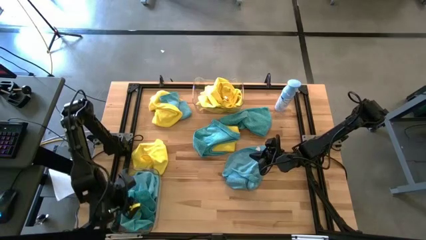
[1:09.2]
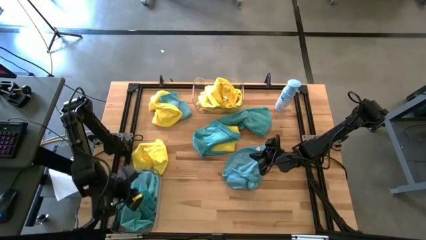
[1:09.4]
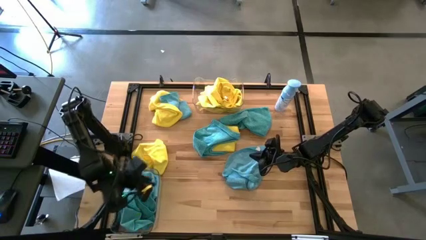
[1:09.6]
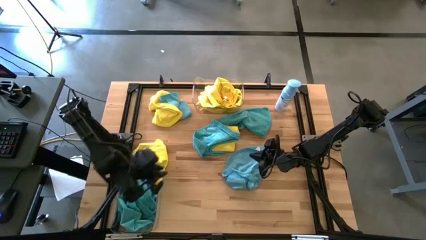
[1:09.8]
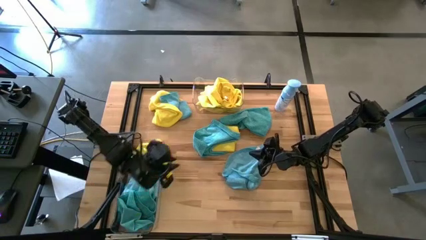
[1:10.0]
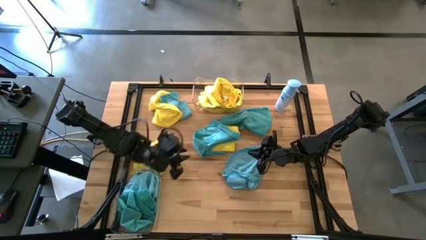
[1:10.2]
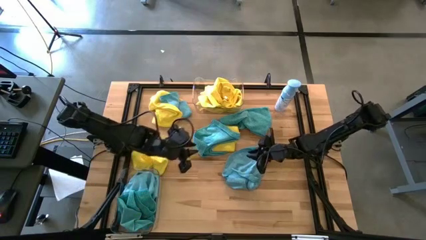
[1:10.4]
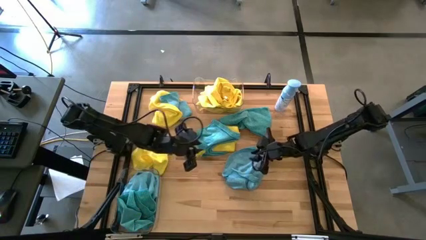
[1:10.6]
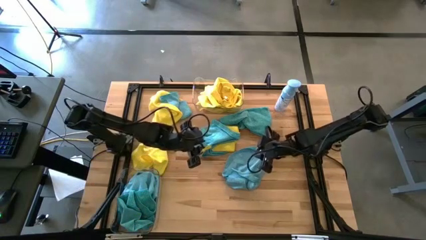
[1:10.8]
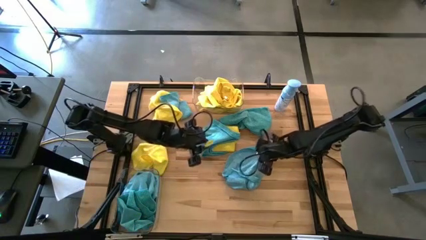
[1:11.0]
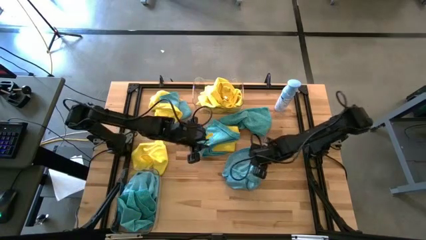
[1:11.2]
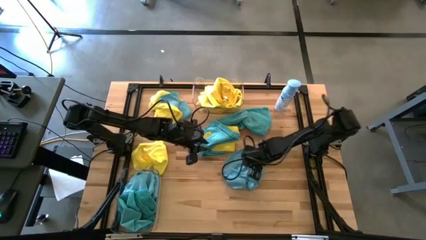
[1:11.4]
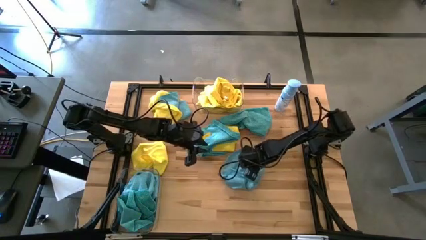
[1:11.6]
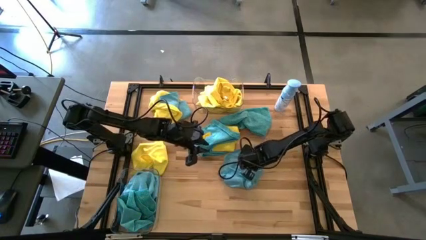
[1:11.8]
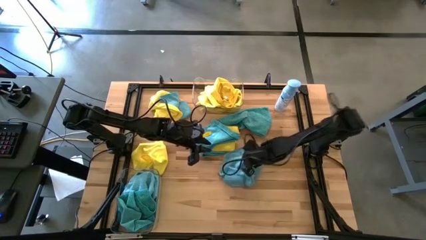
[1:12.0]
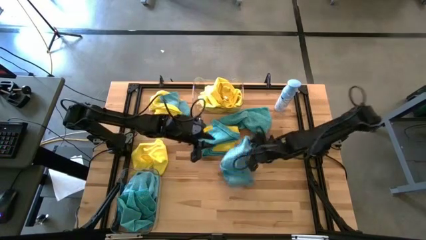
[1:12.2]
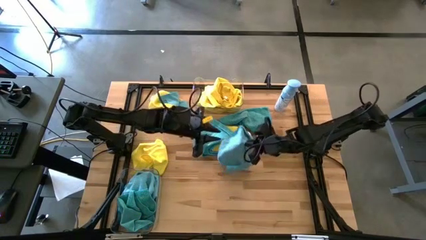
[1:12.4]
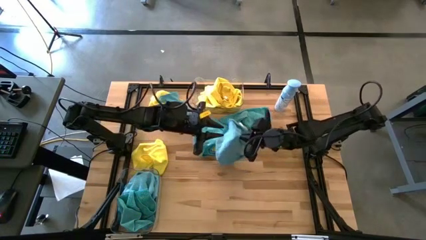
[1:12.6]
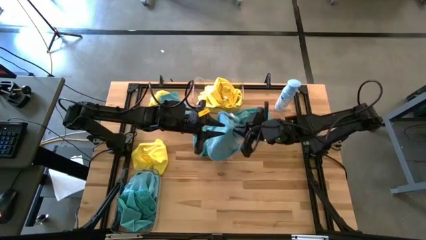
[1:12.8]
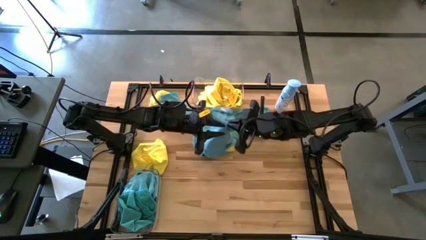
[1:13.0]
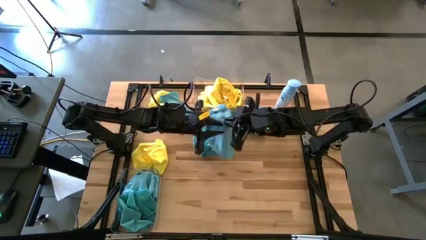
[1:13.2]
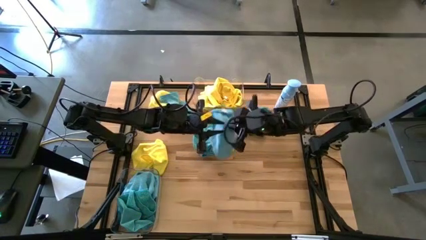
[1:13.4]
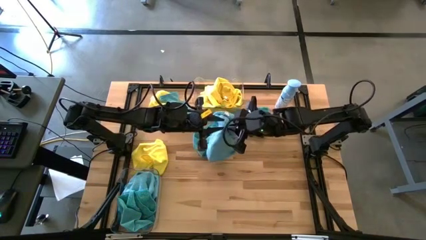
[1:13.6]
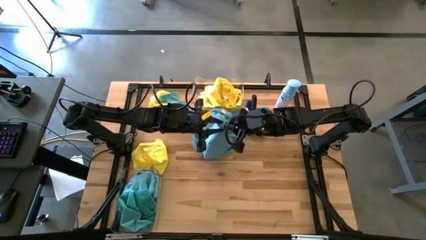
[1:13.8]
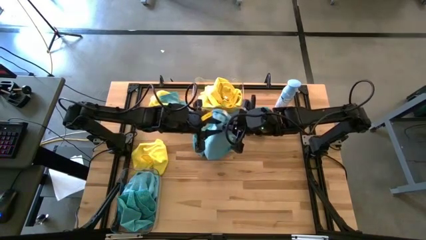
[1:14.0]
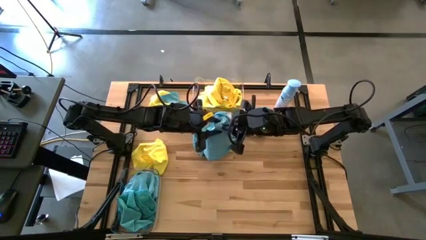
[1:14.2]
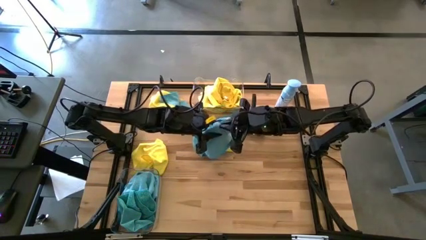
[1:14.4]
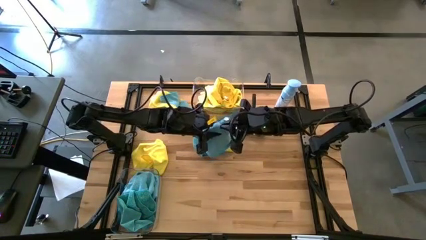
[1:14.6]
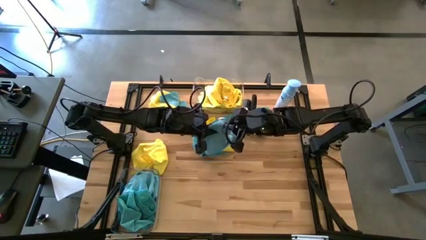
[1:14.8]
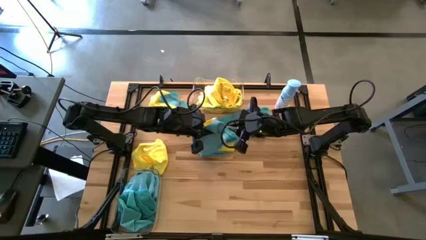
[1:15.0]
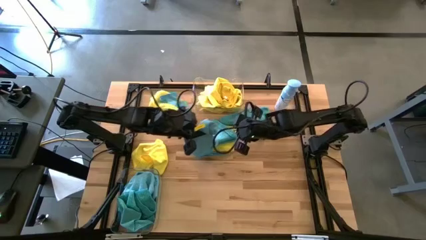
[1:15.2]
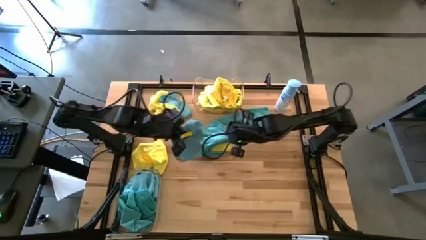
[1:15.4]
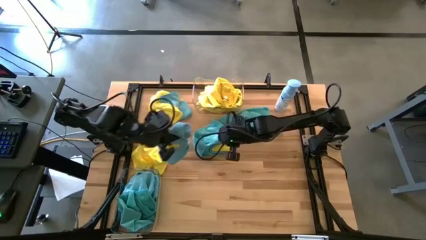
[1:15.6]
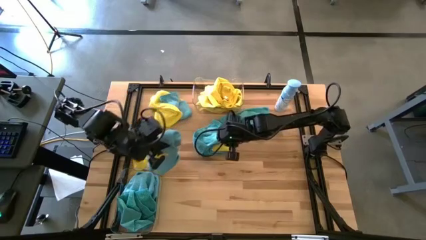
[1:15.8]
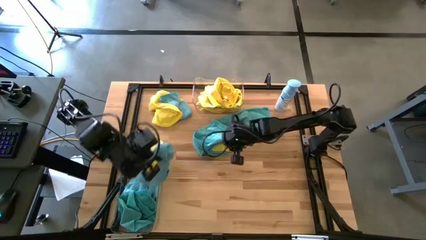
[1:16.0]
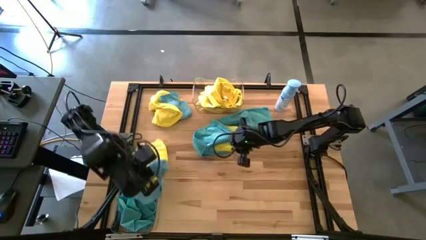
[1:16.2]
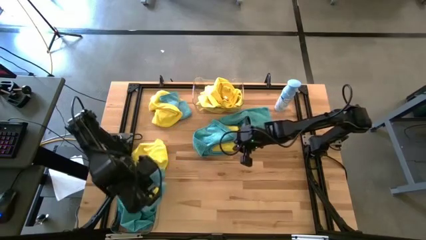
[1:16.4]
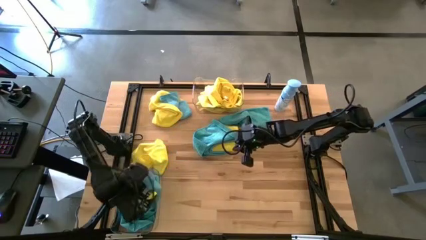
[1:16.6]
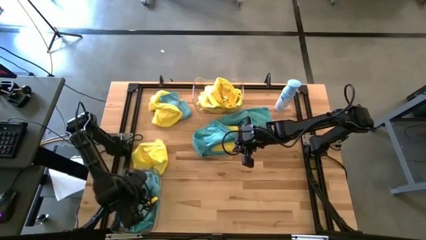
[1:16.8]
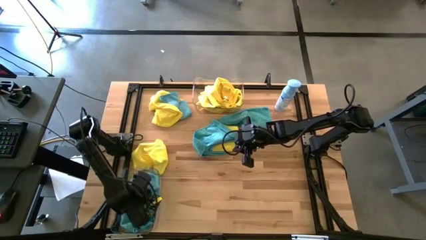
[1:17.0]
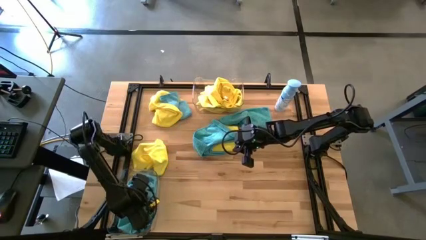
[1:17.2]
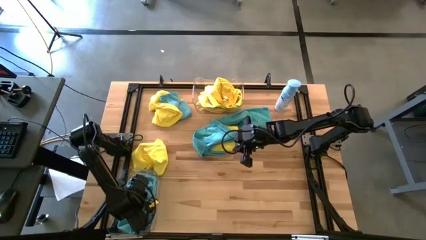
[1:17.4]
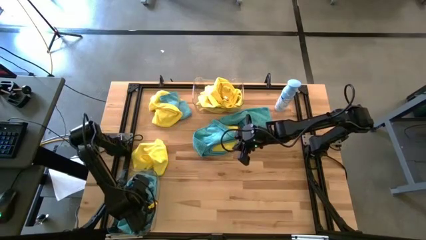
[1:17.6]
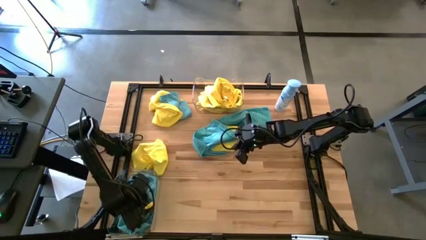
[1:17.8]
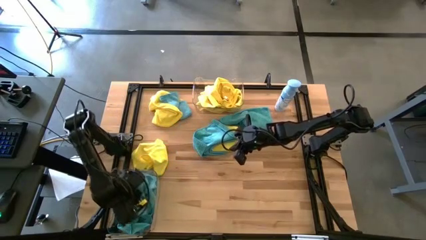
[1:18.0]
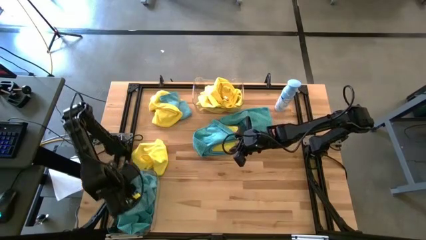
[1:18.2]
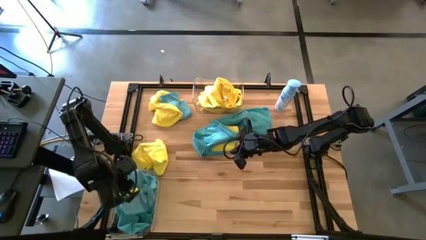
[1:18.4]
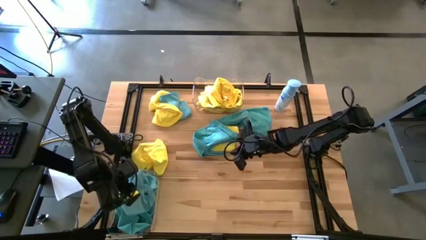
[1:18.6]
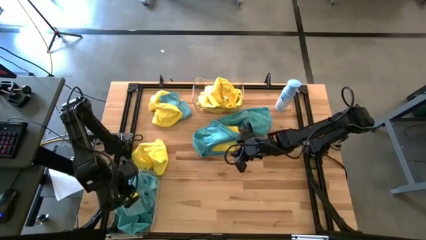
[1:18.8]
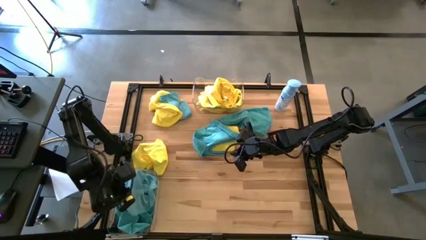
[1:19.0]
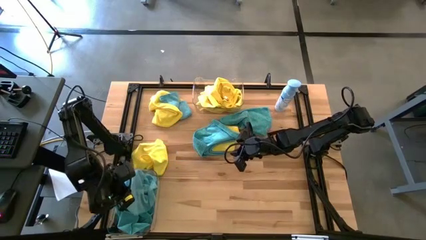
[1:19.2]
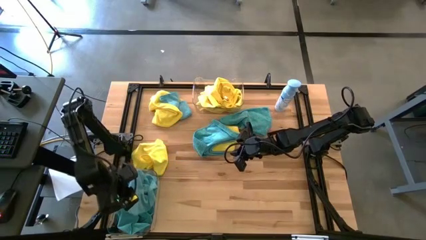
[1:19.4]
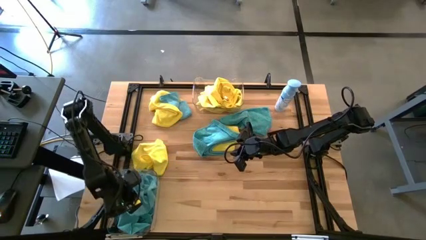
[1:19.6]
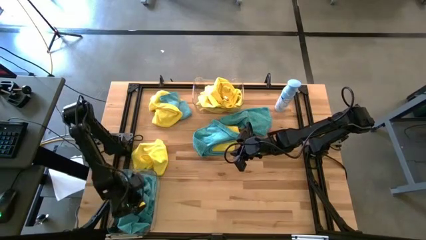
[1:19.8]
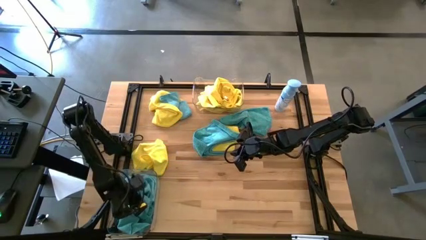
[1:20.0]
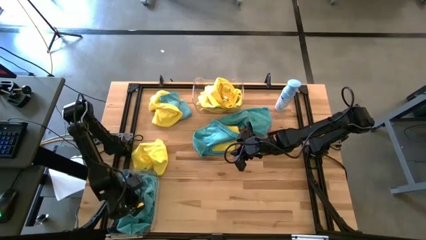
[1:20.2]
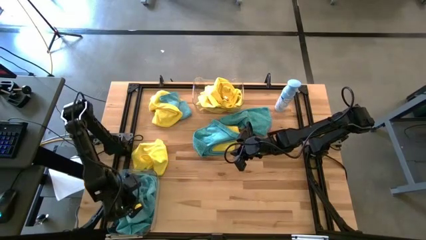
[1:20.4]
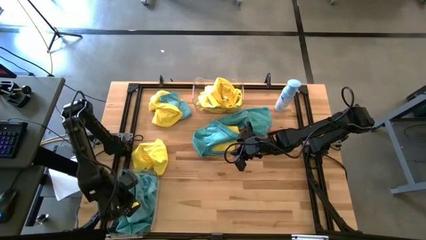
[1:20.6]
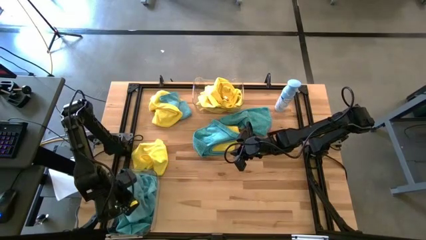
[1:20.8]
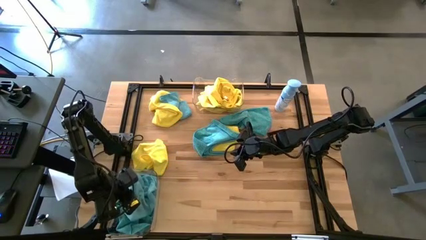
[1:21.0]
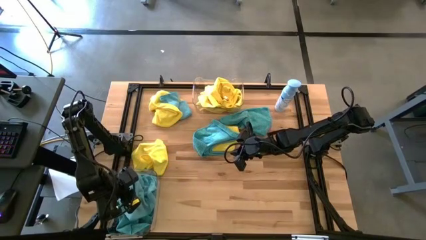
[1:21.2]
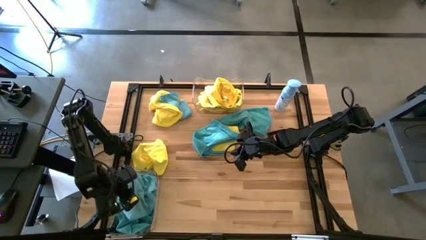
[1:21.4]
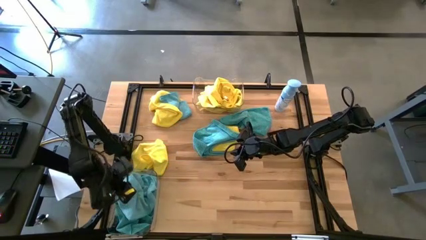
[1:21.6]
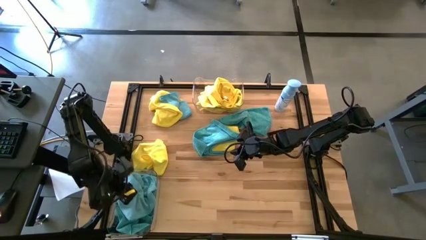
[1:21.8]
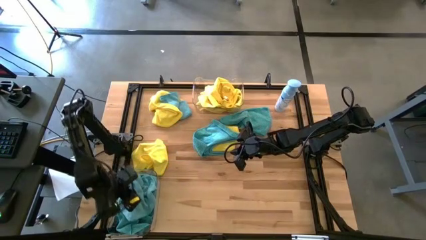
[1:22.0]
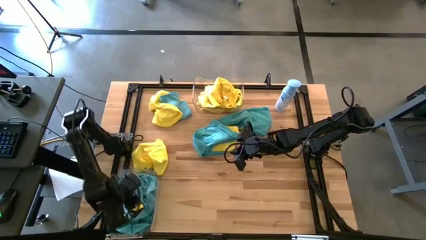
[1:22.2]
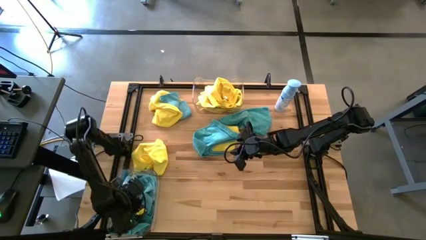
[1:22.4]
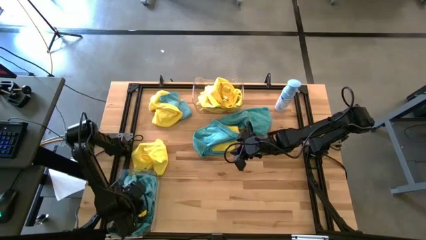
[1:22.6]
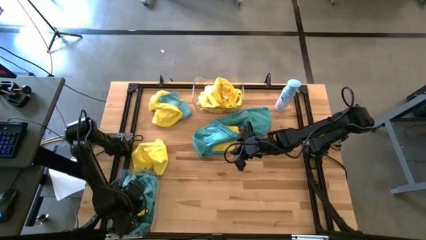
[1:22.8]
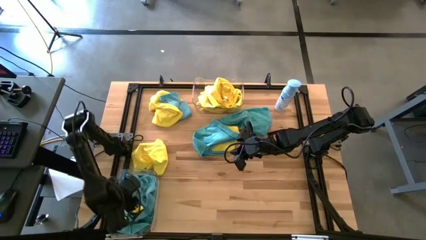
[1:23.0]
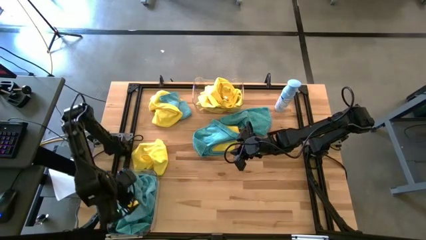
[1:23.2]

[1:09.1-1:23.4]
Task: Sort microfiber towel by color & place in baskets
Put the blue microfiber towel into the bottom transparent bin

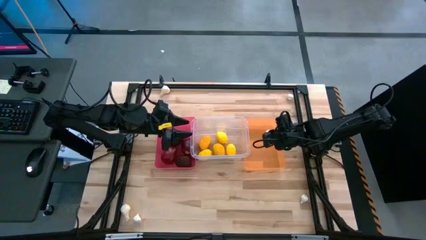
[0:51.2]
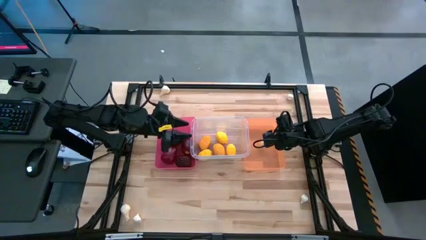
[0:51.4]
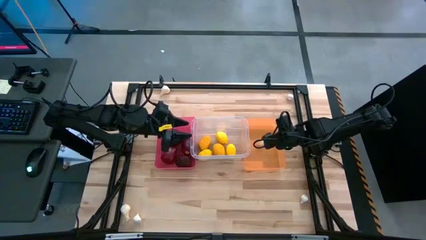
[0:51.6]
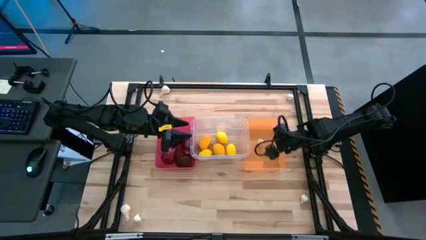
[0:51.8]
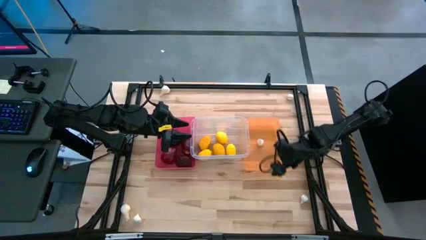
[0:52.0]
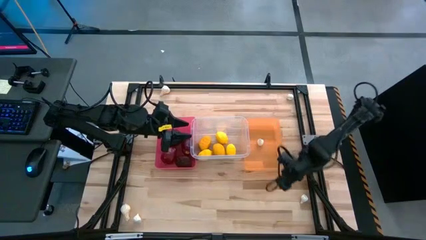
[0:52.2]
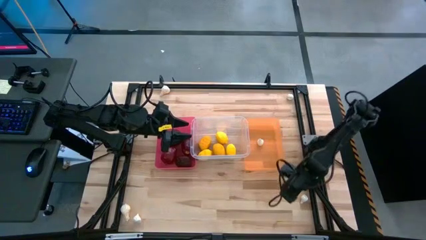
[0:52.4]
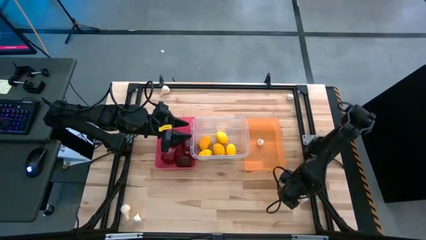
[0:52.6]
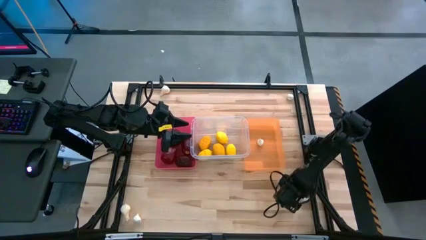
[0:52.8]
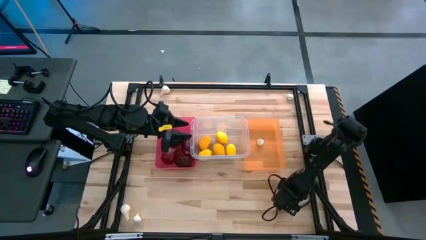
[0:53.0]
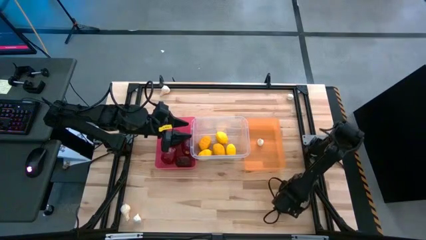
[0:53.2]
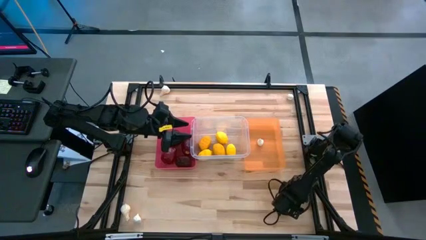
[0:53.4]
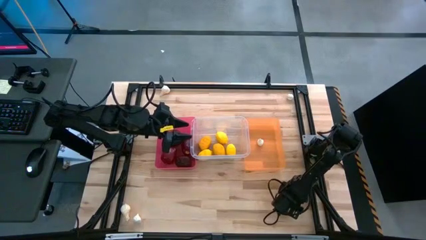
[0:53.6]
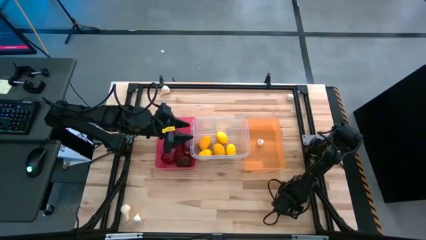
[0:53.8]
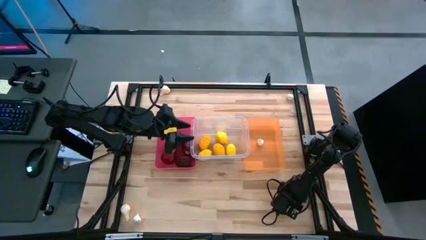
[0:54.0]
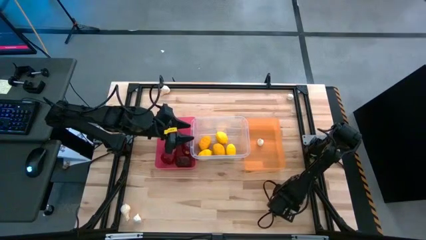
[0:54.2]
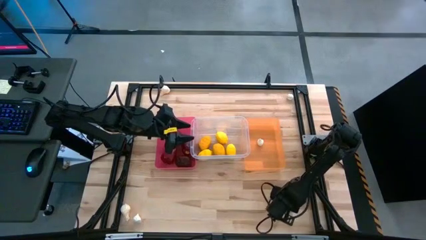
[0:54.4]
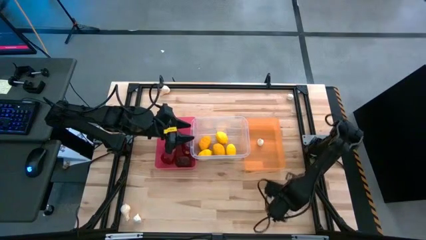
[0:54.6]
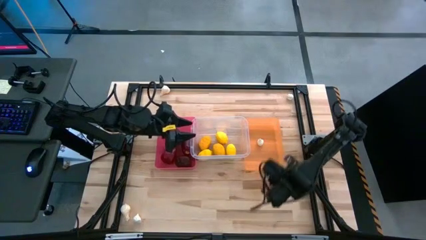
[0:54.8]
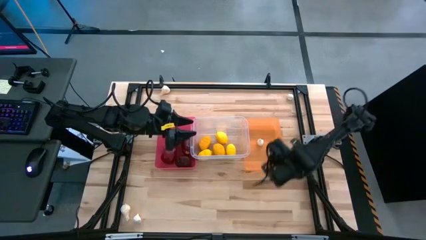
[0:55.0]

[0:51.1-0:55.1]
Task: Sort produce into baskets
Put the white garlic into the orange bin
